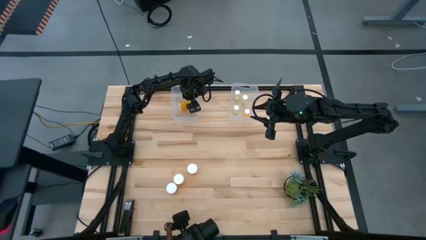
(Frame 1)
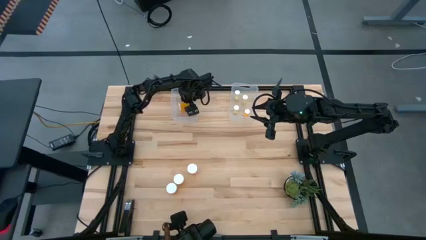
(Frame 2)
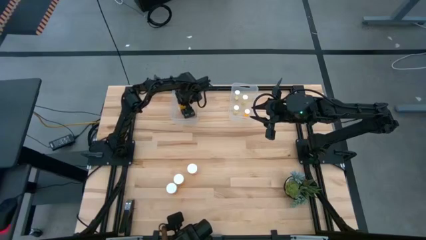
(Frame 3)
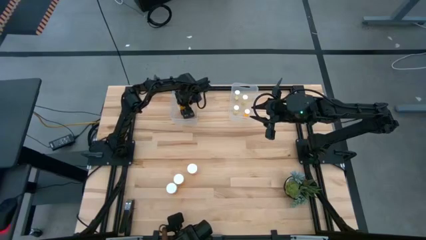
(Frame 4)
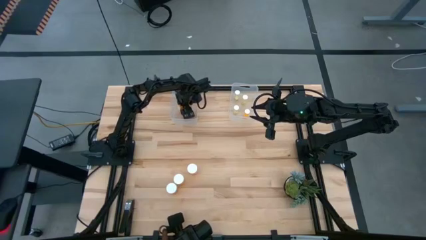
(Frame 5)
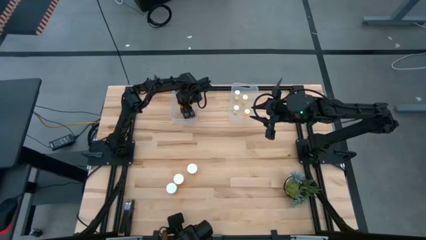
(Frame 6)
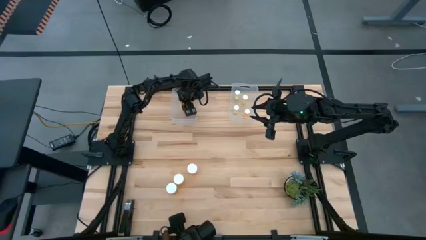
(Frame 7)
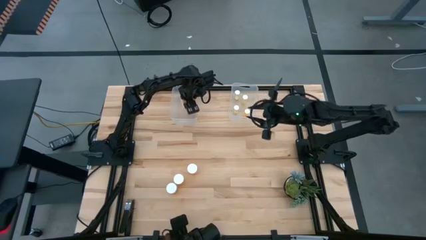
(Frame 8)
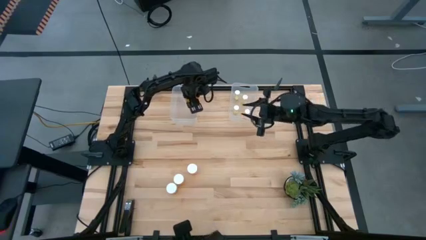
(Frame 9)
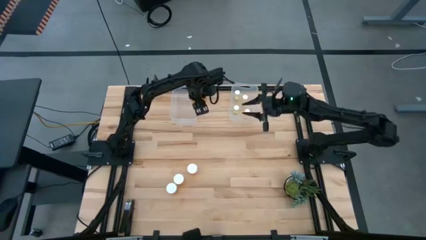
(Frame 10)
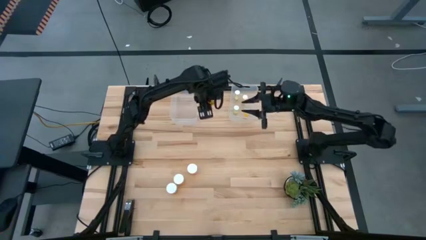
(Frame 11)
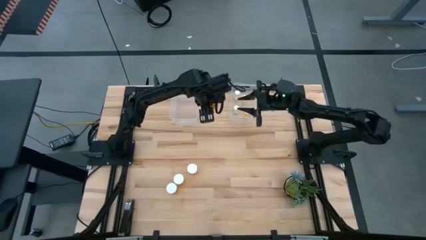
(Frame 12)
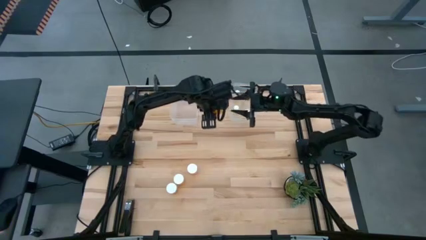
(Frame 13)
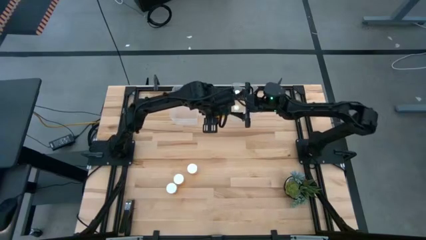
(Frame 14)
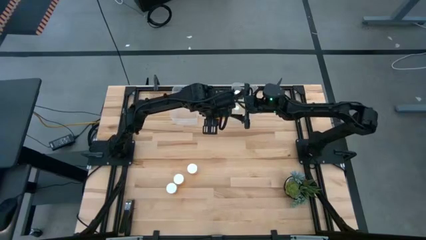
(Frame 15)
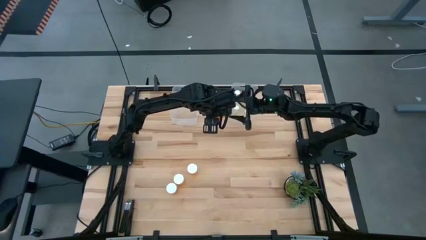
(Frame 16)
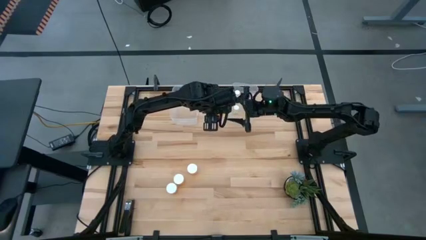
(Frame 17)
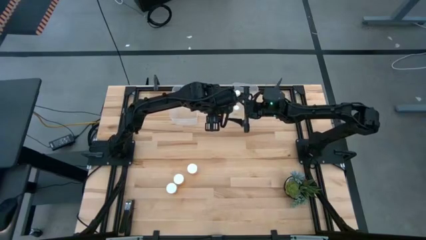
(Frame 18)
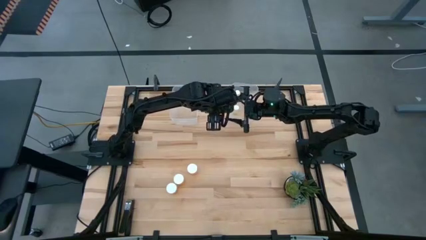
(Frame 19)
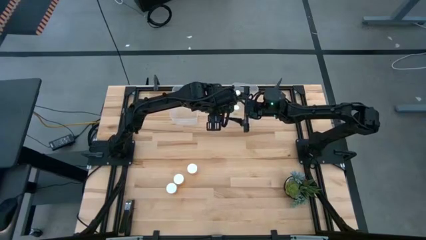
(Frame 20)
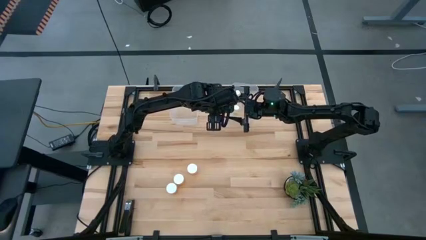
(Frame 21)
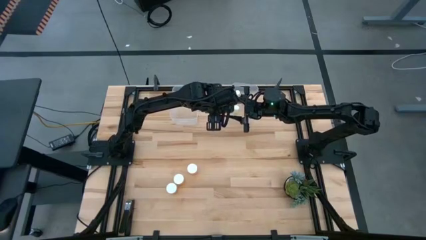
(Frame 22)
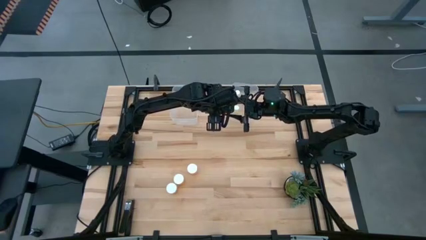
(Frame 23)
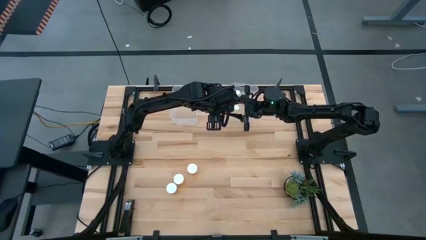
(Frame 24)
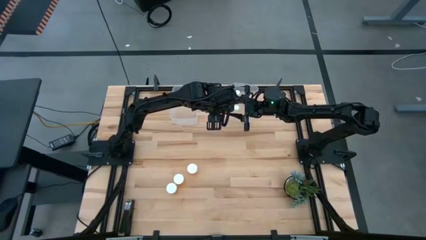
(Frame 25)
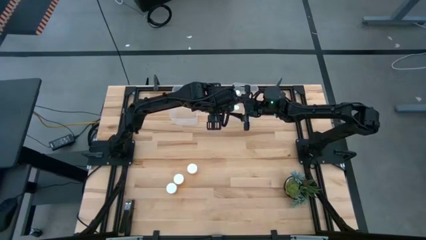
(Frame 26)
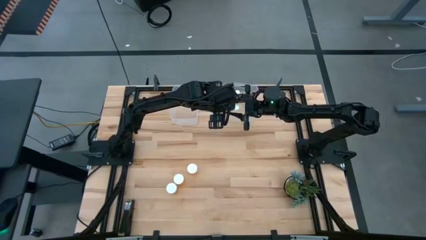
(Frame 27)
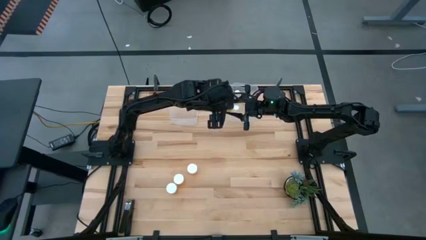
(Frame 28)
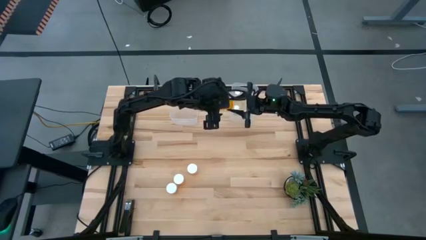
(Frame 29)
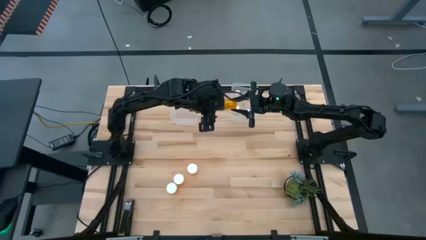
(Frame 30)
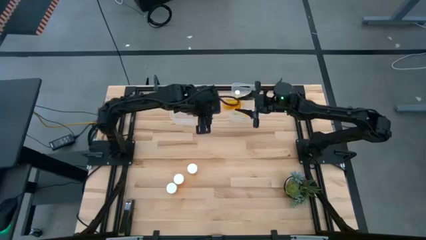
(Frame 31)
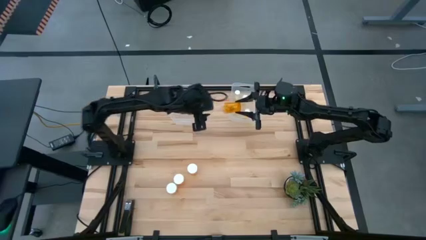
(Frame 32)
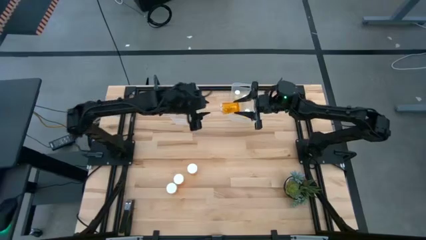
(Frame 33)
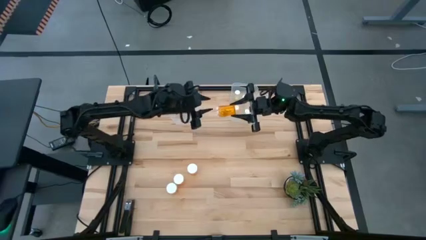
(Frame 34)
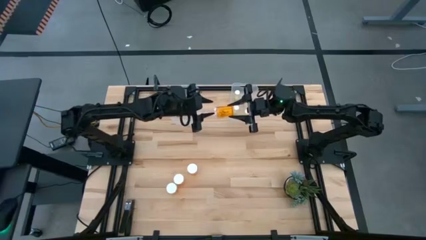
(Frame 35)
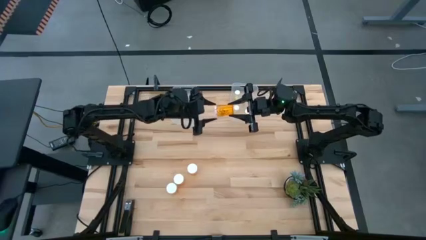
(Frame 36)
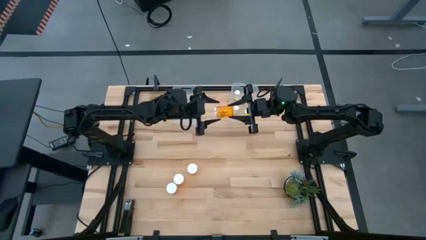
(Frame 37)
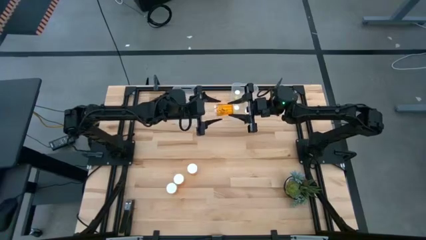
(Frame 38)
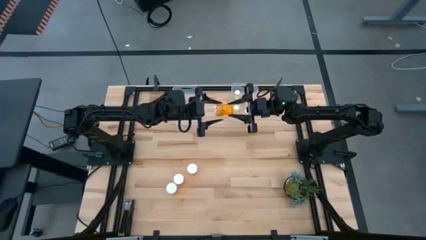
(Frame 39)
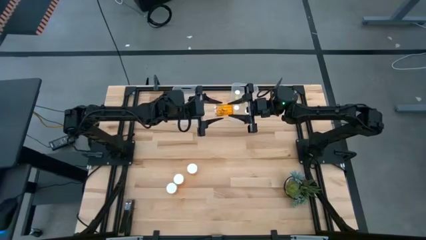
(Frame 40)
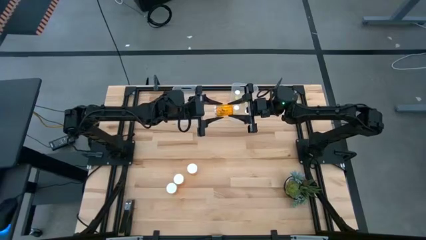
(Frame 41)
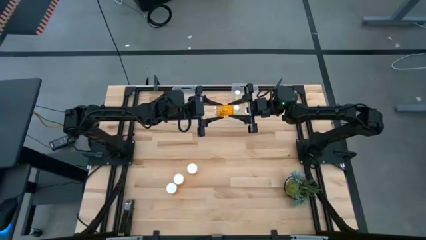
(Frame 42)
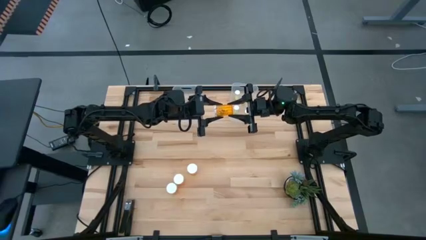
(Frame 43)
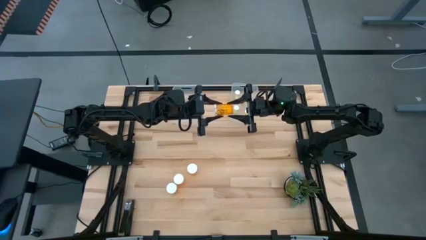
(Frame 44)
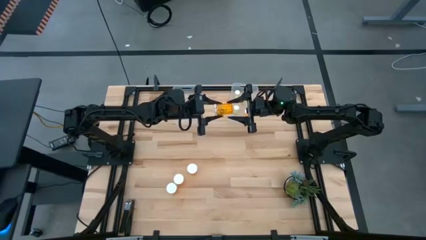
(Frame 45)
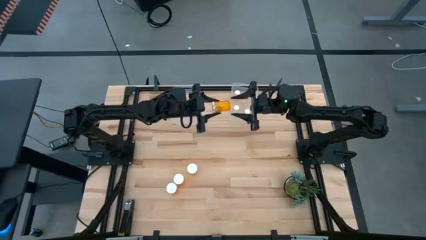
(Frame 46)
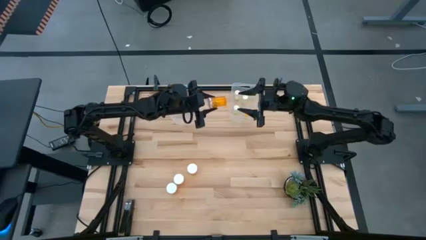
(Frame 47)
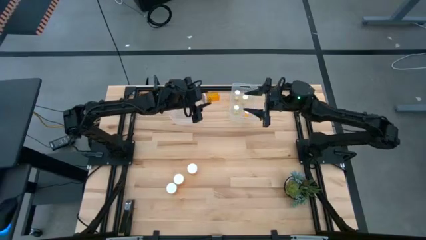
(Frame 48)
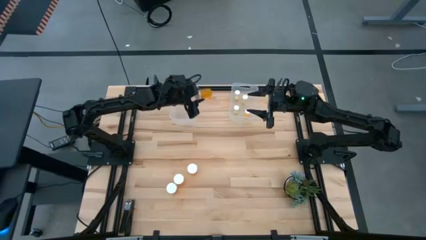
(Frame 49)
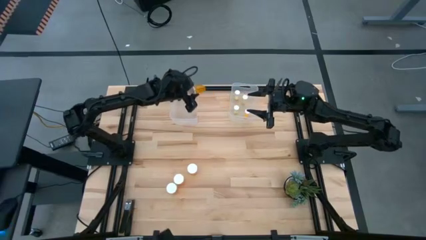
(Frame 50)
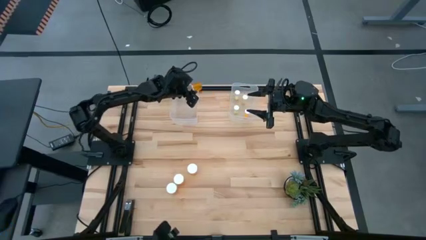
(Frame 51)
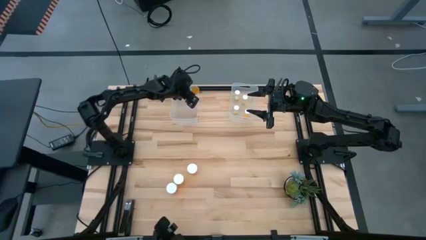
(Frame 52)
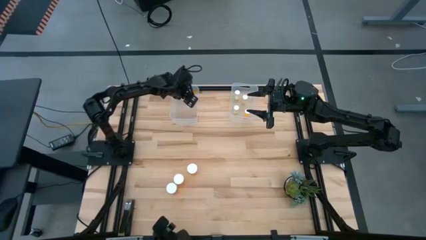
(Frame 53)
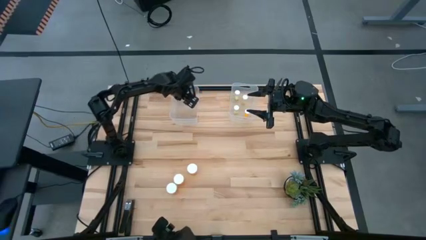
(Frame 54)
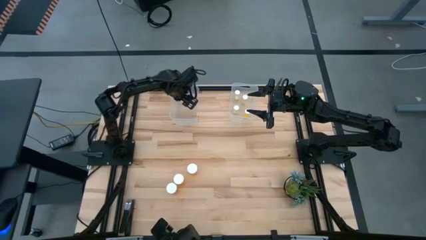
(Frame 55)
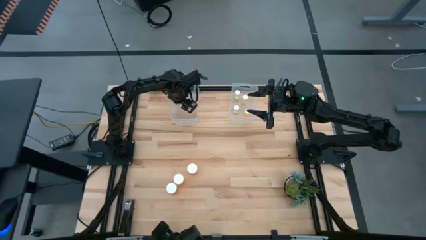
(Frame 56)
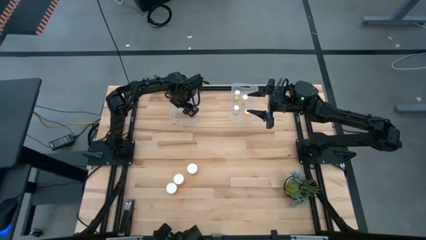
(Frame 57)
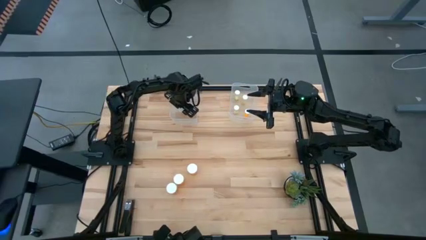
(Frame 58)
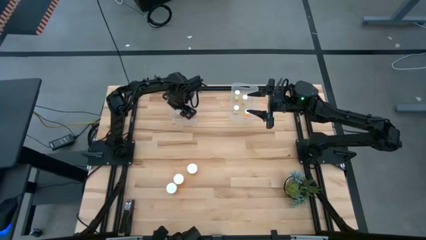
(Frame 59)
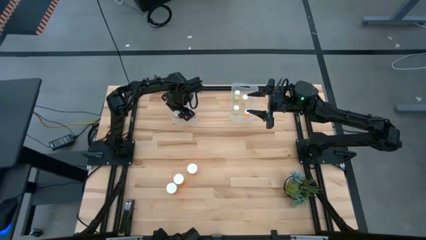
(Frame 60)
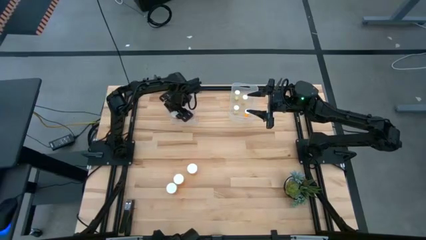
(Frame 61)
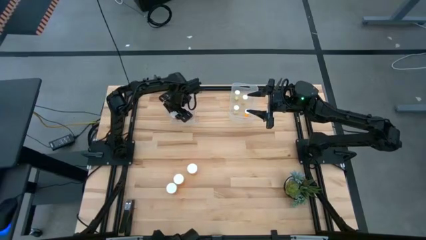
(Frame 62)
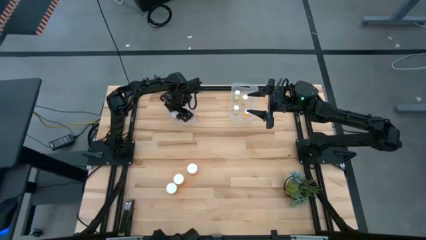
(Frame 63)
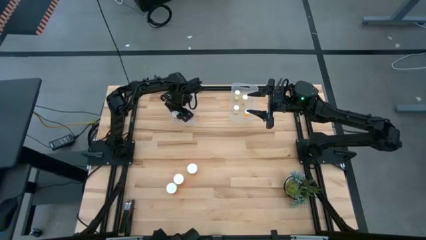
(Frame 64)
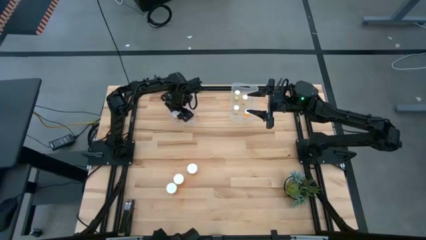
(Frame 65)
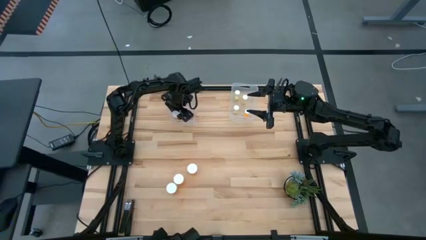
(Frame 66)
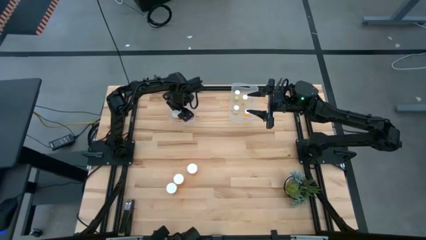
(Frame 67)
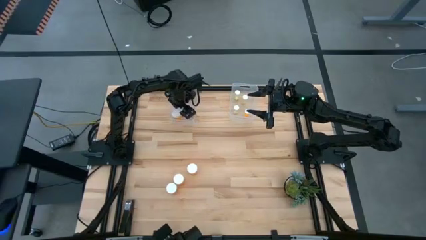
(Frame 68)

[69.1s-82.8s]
Task: Pick and place medicine bottles into bin by pill shape (circle, oval)
Put the top big orange pill bottle into the left transparent bin

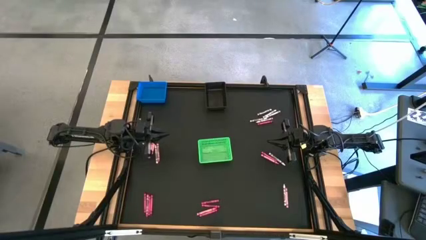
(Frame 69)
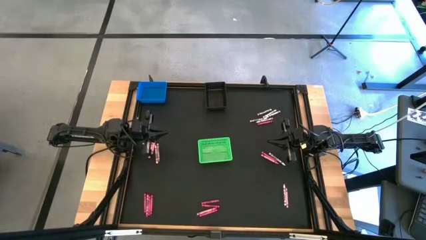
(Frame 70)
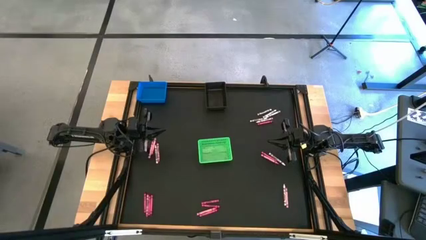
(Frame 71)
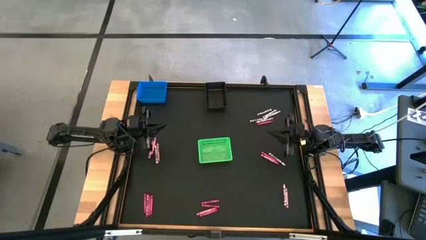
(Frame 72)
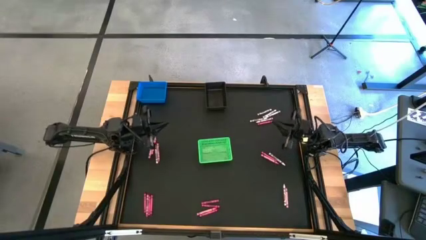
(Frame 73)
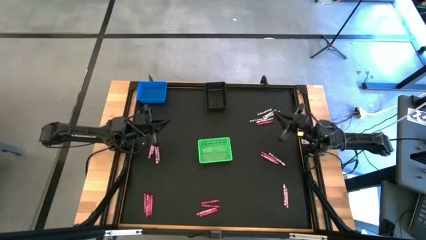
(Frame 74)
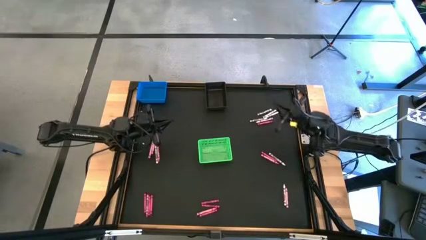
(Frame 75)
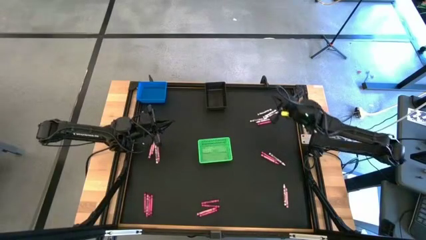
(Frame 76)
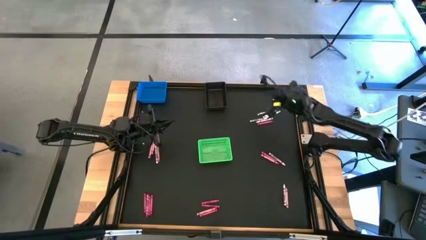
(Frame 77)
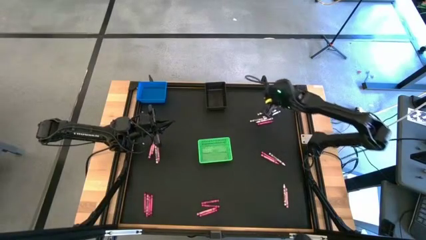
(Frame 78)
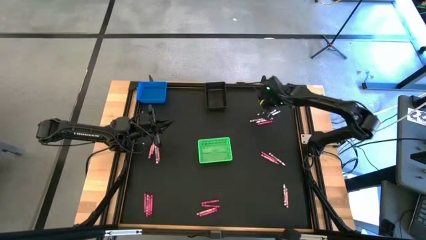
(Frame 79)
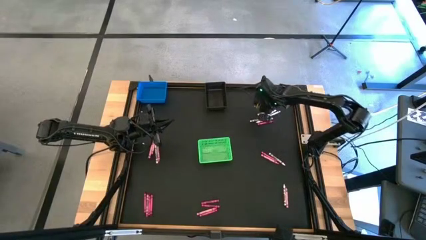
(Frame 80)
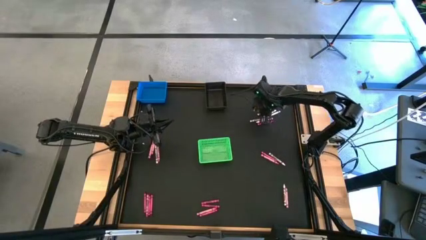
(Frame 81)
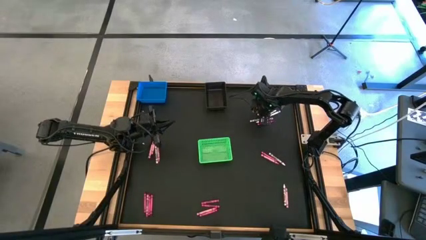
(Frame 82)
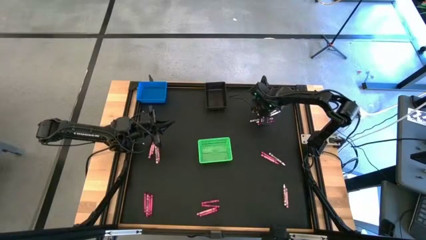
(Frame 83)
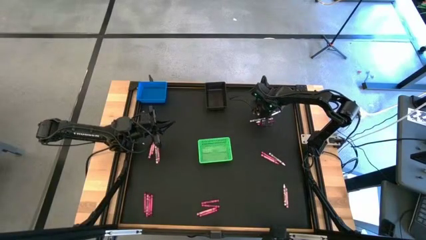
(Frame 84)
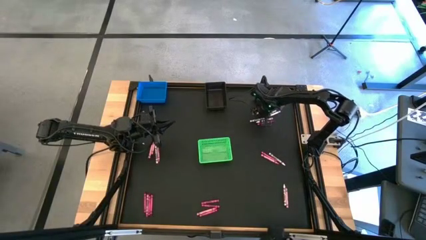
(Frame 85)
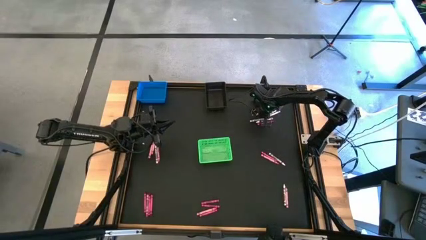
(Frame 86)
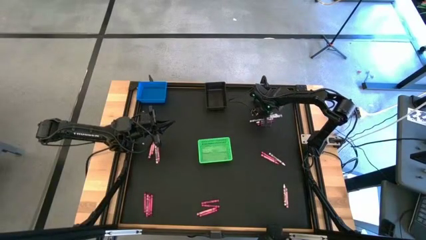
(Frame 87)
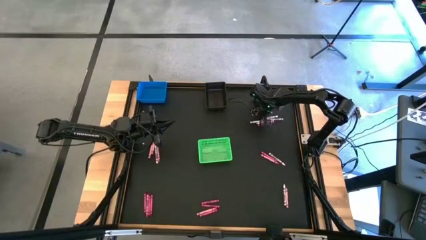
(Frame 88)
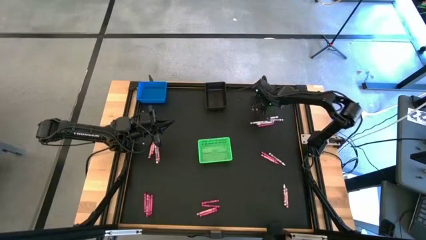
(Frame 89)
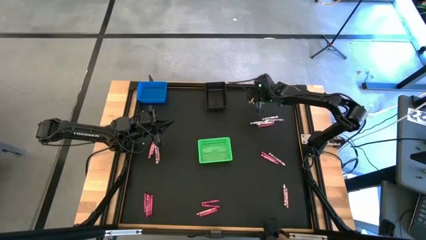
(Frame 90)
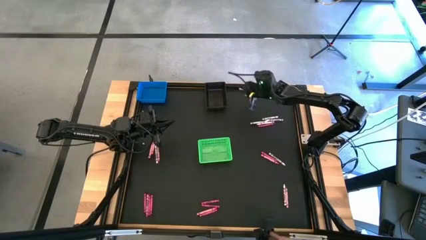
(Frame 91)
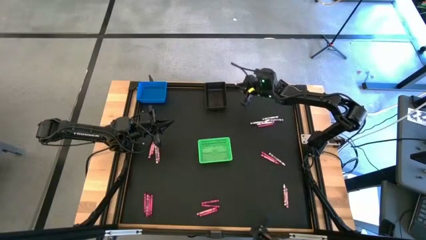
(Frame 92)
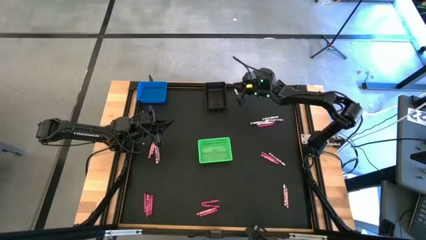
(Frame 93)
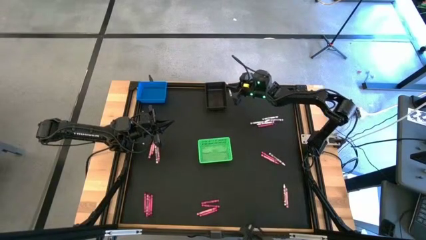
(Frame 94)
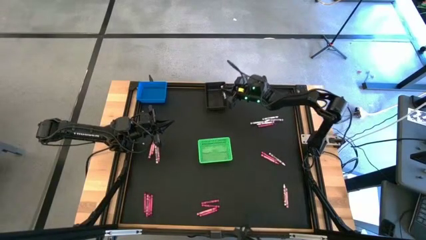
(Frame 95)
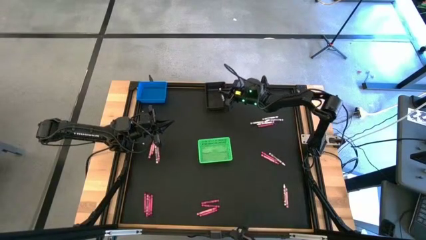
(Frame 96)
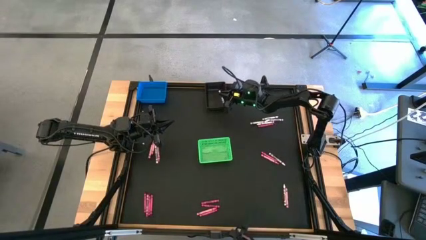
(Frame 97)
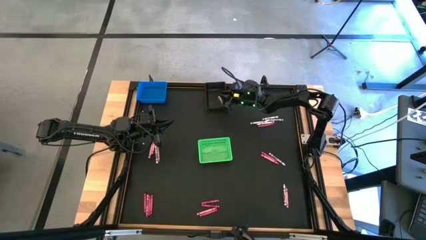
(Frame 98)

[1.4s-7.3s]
Task: Sort crayons
Put the white crayon into the black bin
